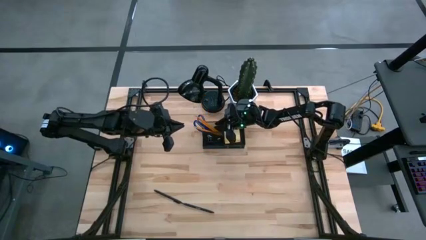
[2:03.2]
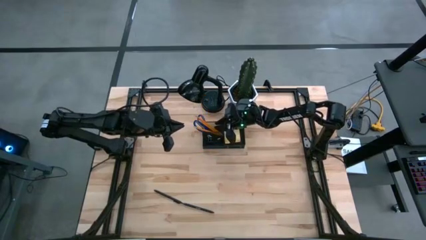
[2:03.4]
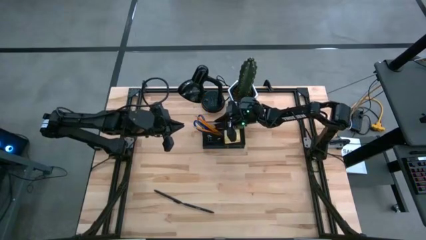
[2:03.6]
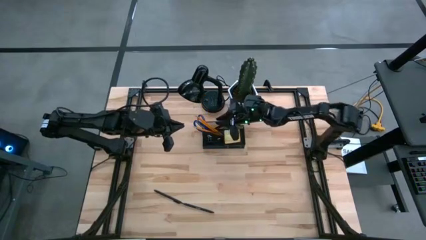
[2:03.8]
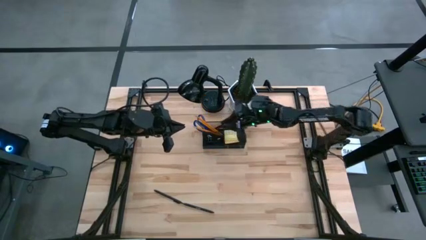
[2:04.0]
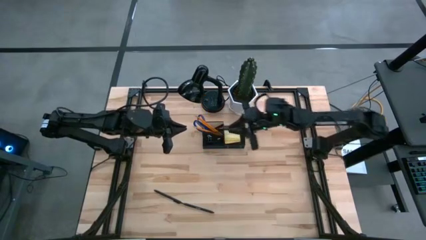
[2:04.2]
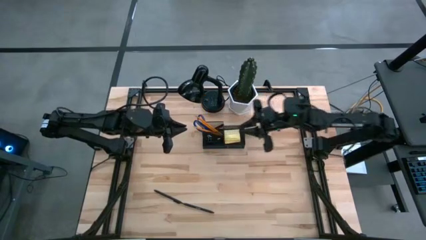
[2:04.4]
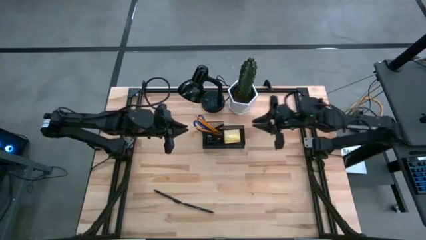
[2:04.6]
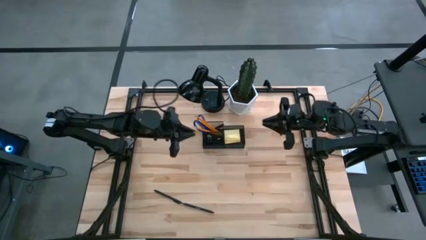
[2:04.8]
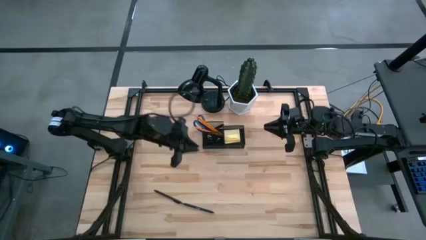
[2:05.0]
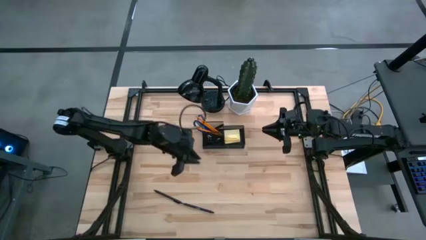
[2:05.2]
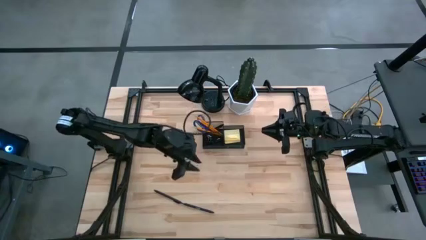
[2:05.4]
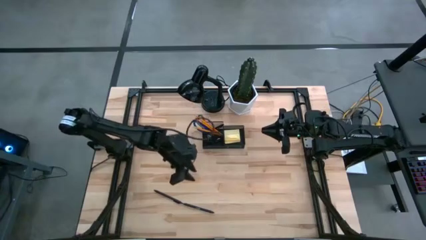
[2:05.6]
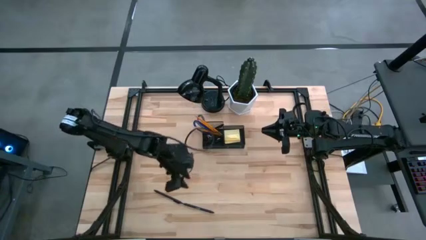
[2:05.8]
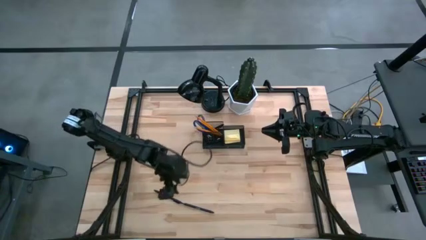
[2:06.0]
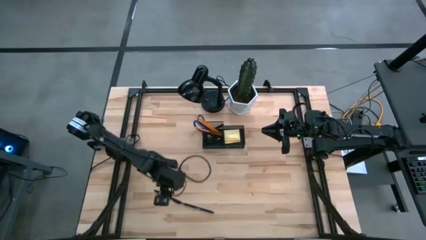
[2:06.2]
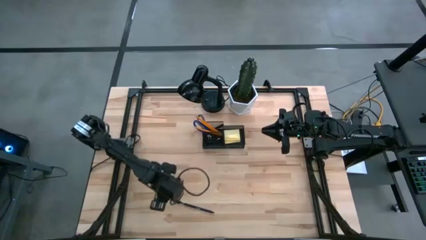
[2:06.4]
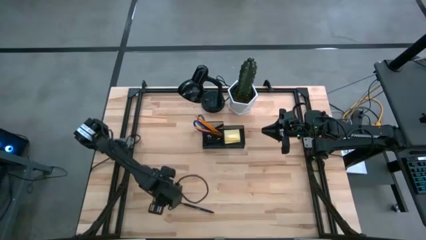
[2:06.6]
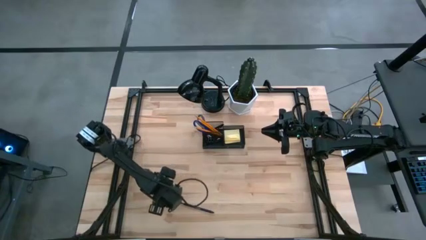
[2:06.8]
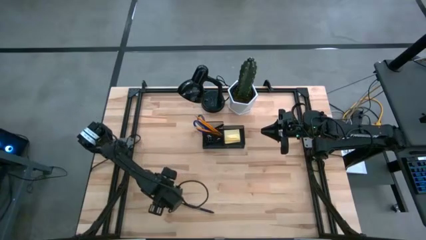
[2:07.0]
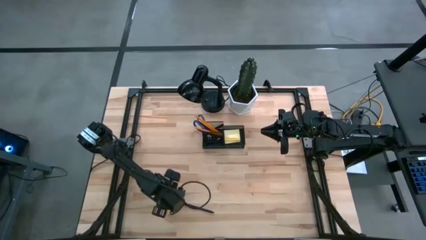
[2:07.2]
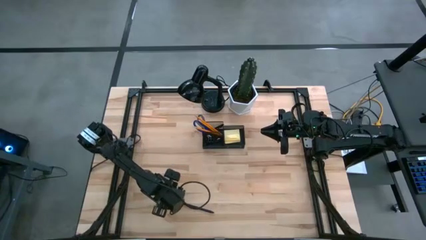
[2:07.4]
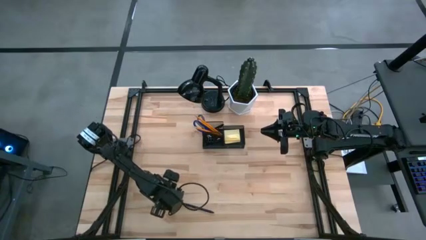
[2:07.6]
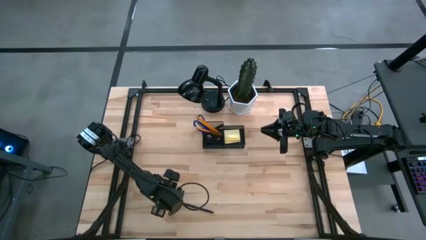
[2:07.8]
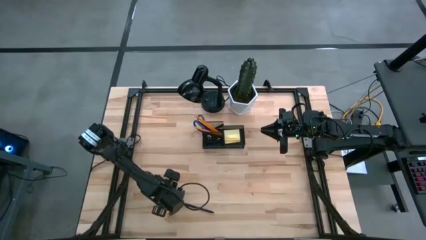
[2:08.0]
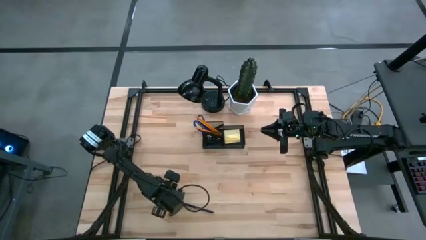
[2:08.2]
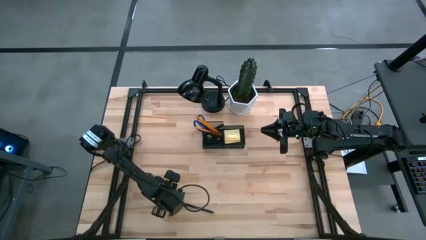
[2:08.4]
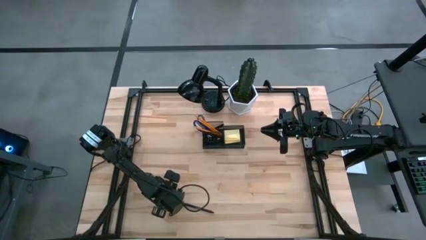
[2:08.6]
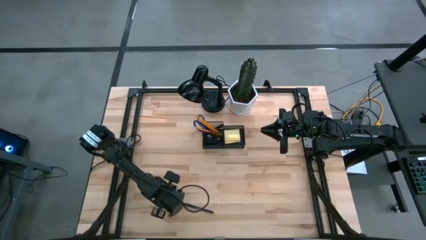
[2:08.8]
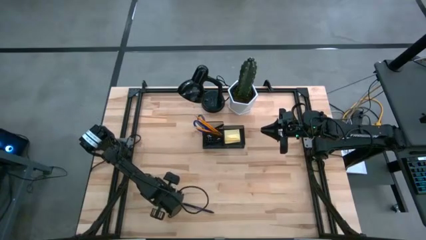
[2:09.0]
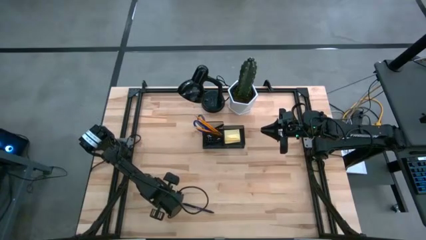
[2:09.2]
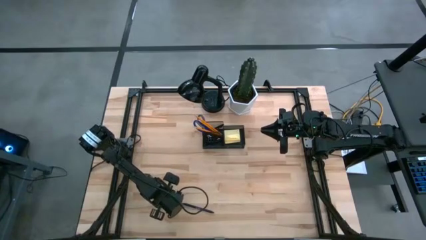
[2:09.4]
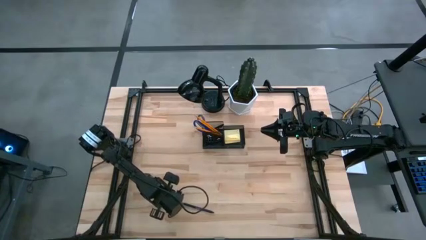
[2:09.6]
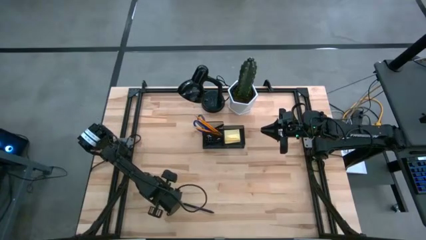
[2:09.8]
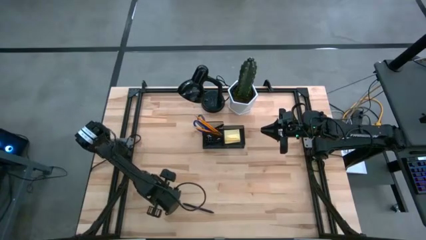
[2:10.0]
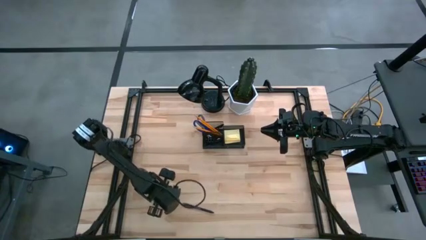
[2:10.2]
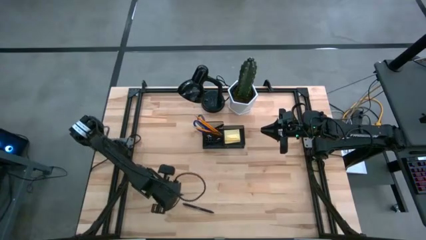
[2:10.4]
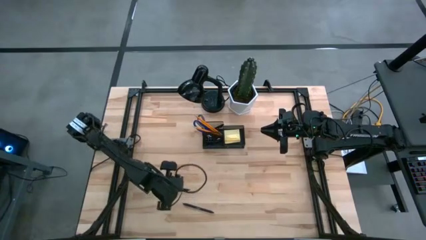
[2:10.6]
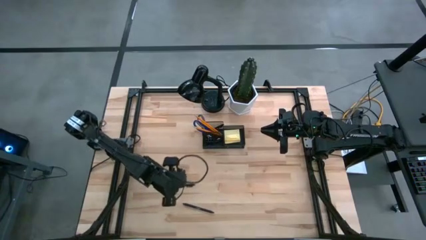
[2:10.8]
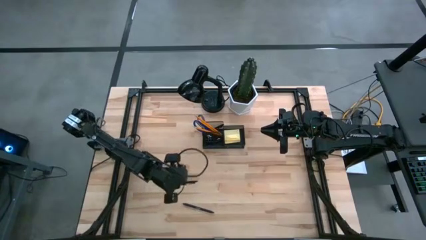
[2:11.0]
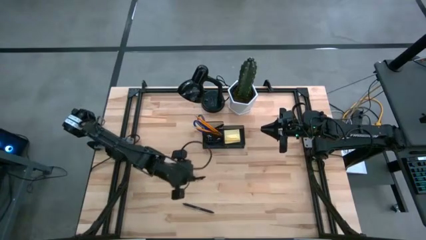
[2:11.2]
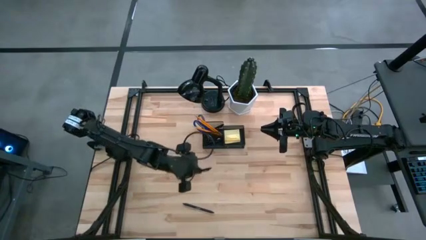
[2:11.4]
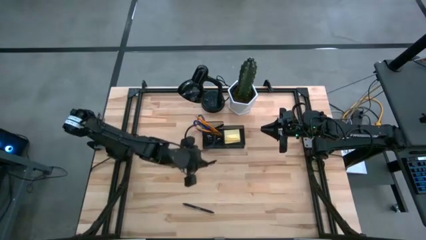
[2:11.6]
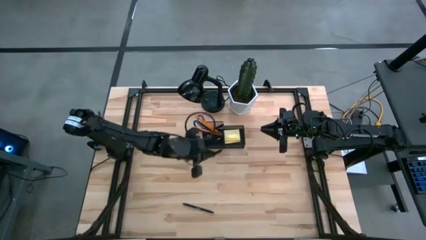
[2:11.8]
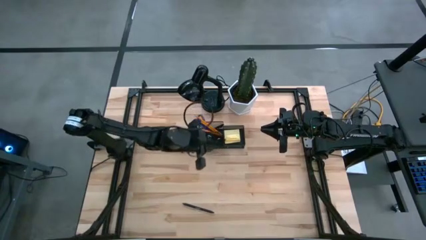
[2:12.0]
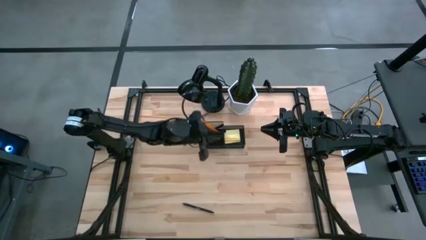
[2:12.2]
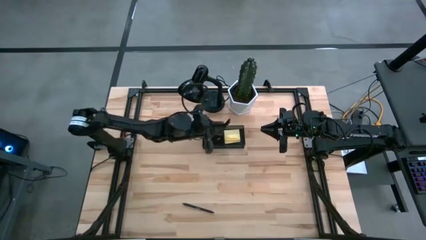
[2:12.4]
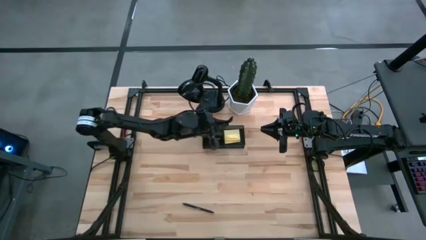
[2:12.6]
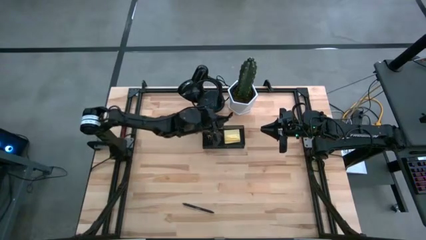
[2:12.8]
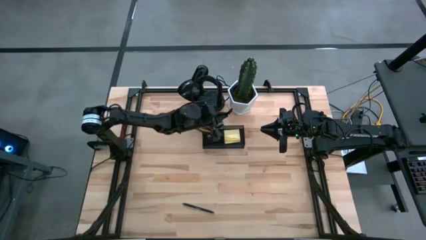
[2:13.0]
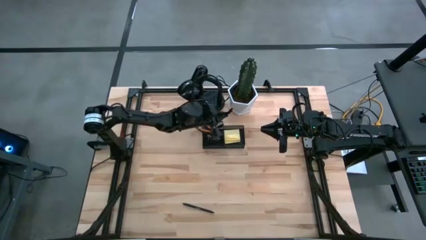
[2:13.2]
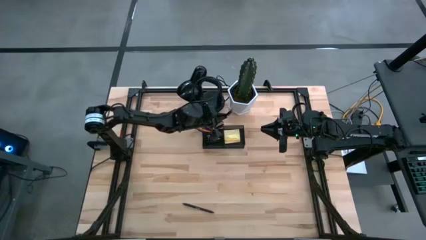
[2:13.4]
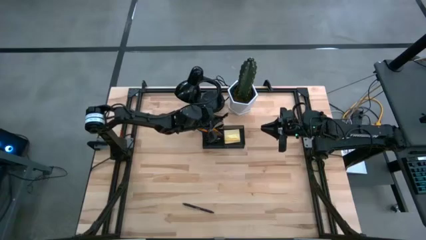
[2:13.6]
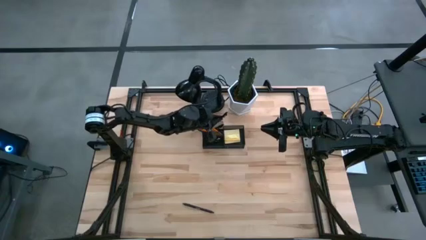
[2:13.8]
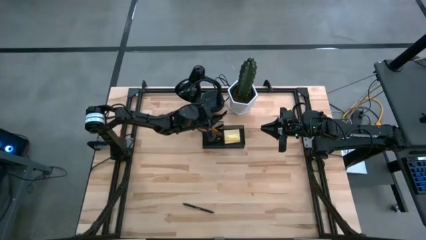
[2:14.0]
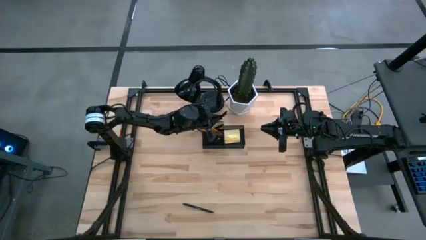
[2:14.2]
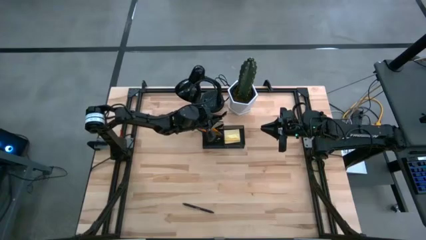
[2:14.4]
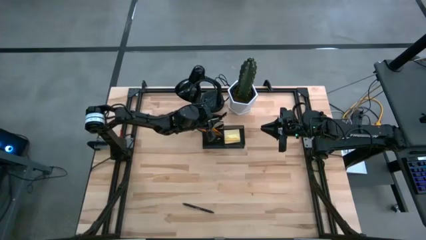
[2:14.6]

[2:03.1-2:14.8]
Task: Pick and place office supplies into organizer
Put the left black pen into the black desk organizer

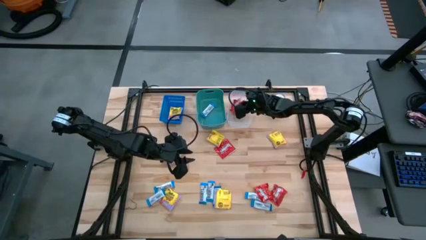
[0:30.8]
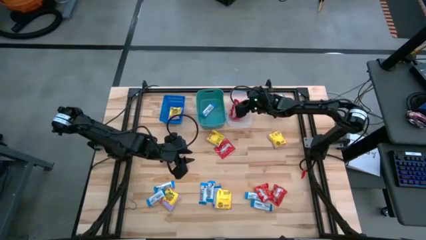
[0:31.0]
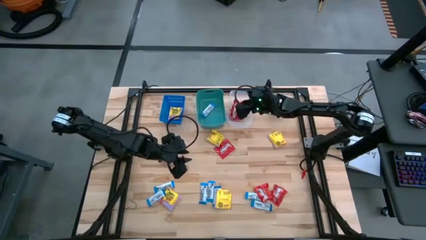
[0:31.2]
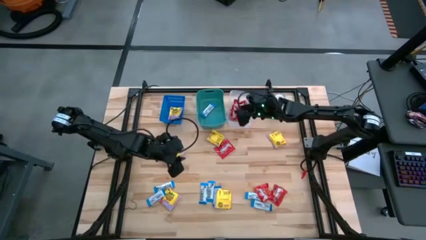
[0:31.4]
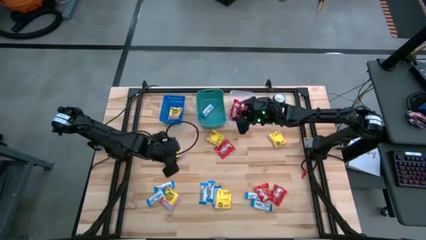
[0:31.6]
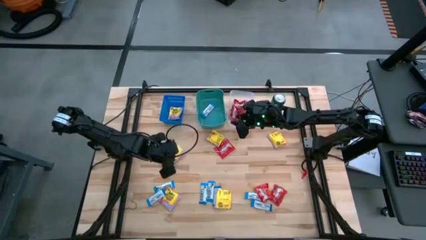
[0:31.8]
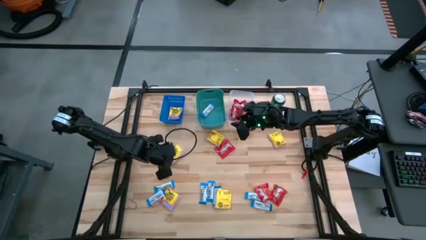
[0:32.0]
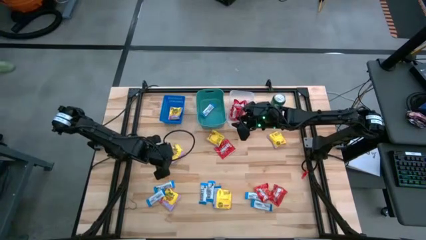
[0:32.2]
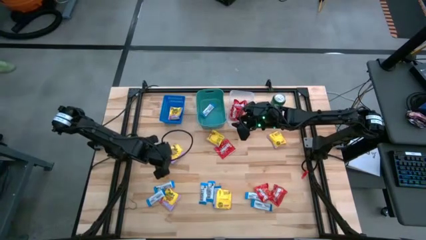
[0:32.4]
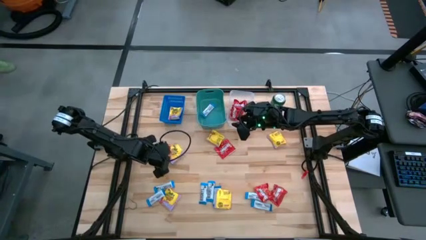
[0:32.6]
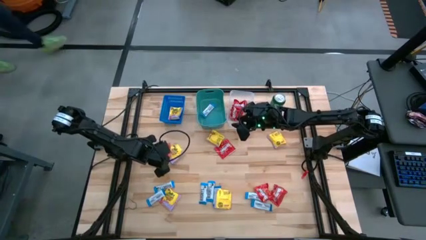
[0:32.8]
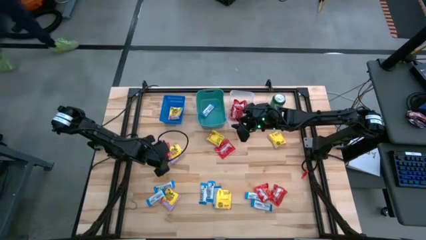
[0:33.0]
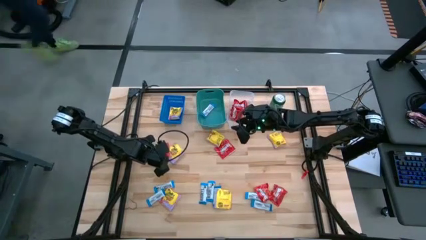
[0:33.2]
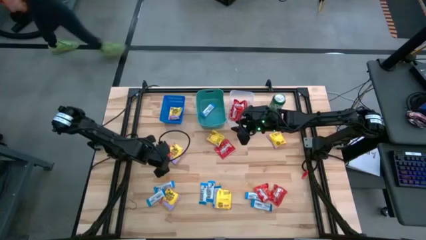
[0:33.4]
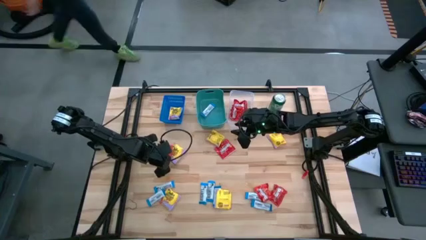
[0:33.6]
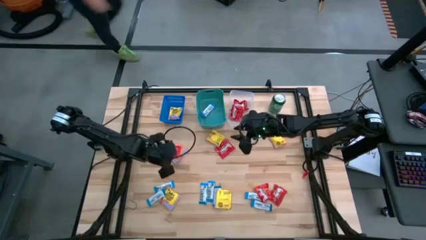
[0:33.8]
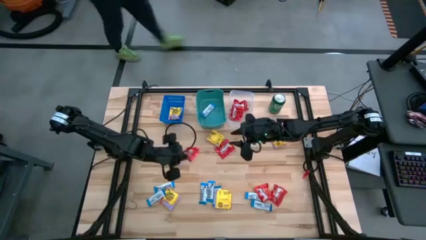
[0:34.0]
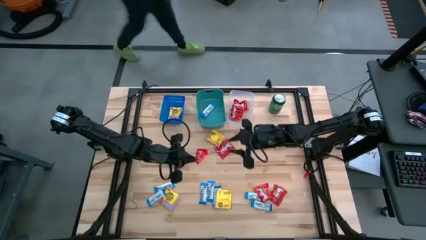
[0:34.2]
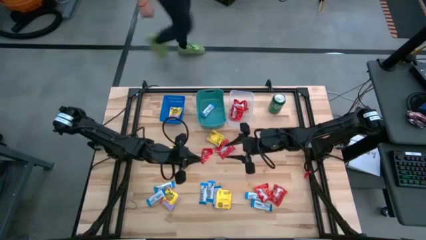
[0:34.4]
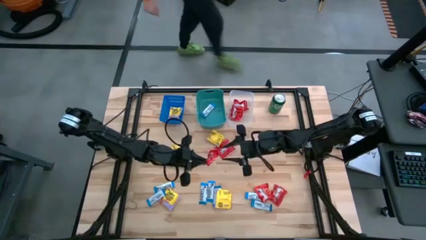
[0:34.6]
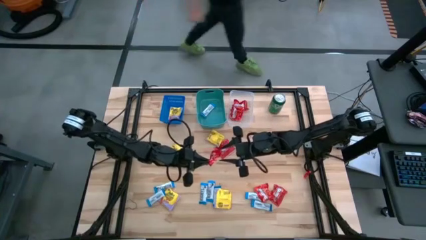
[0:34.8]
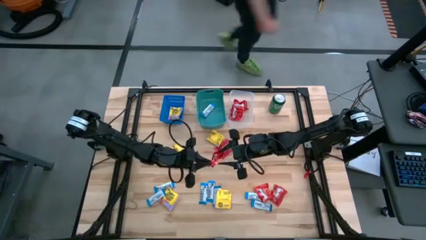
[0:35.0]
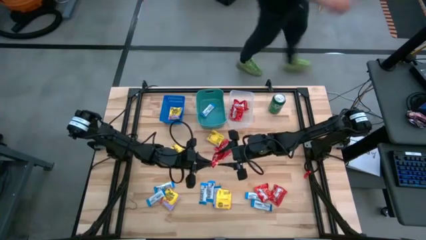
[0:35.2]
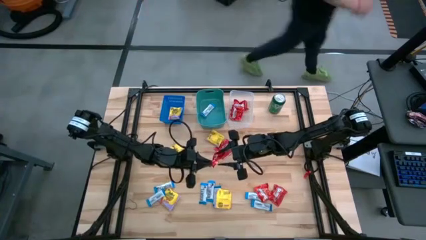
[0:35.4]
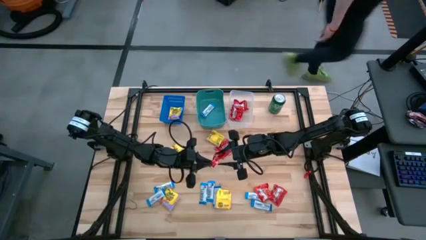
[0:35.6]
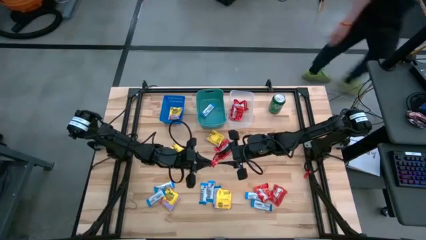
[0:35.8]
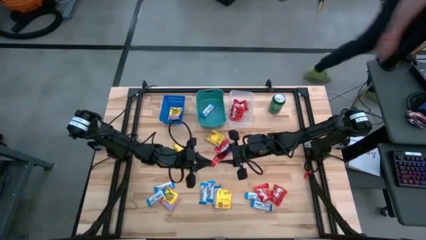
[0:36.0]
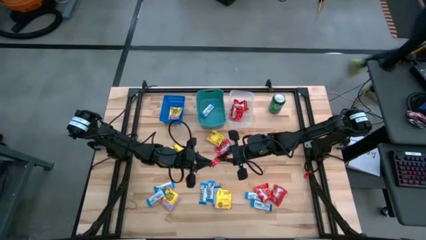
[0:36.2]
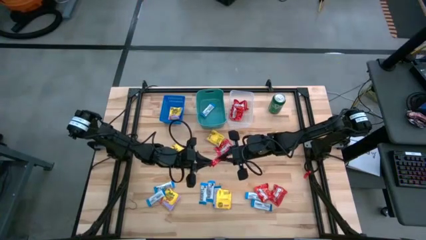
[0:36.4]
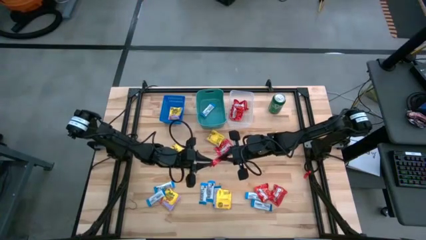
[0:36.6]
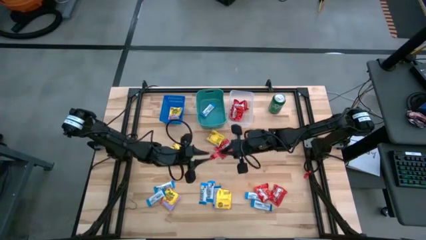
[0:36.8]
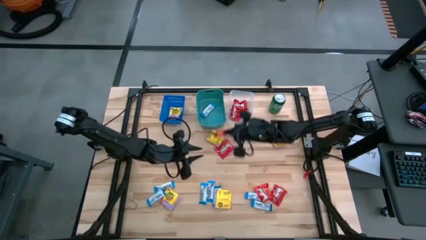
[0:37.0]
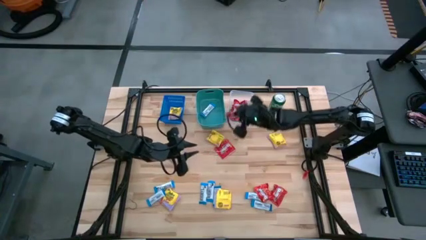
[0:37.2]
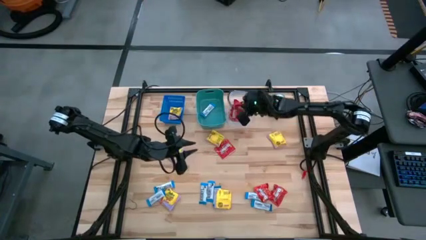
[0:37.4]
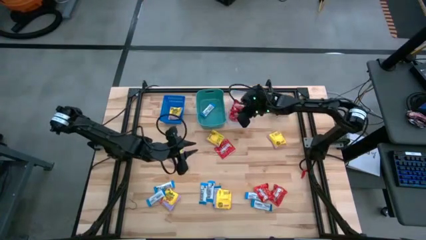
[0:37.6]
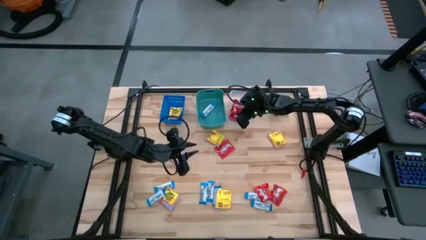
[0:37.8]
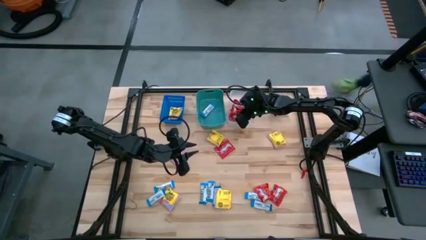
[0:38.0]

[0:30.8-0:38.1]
Task: Sort candy
Put the red candy into the transparent bin
